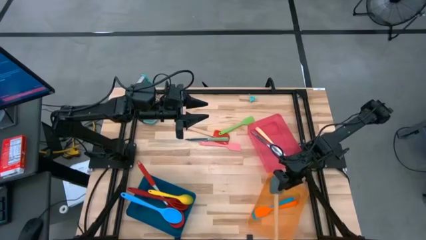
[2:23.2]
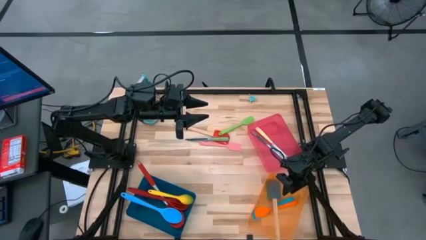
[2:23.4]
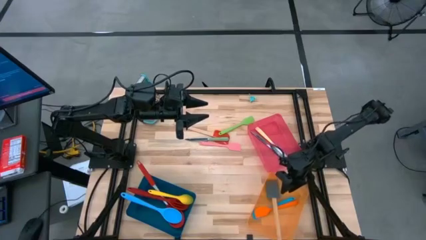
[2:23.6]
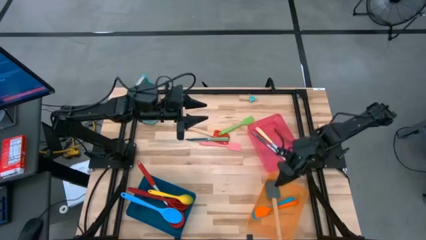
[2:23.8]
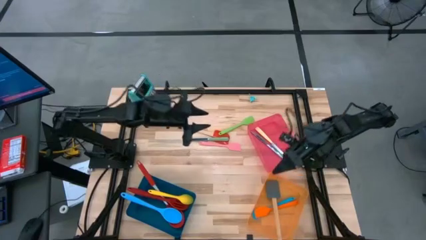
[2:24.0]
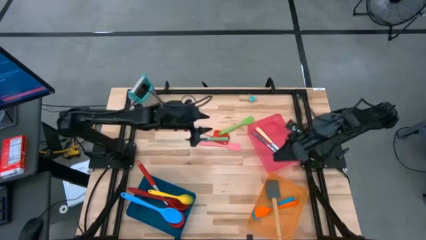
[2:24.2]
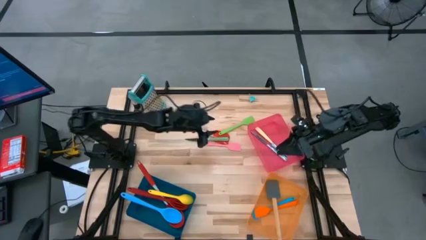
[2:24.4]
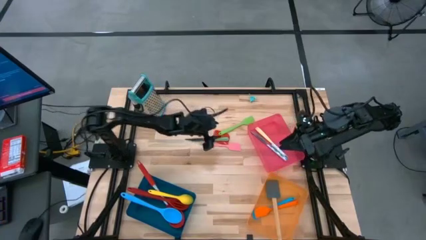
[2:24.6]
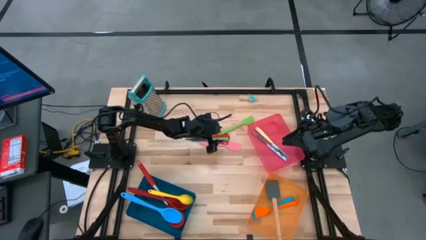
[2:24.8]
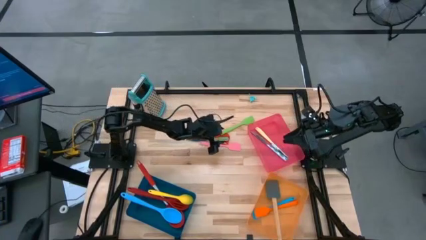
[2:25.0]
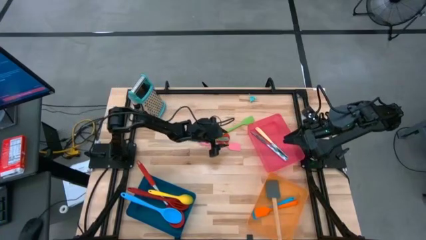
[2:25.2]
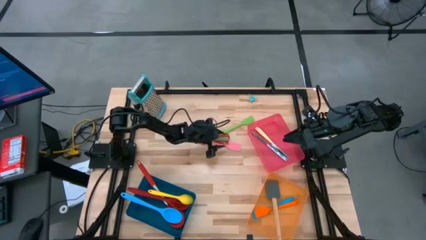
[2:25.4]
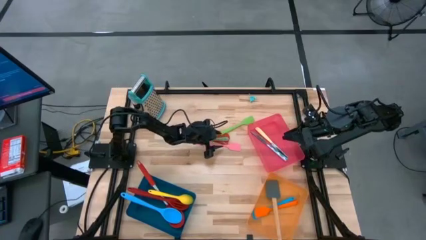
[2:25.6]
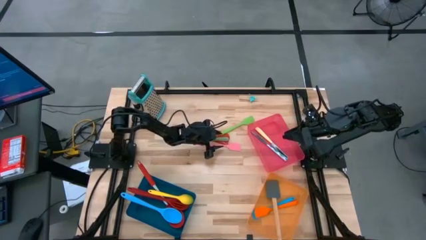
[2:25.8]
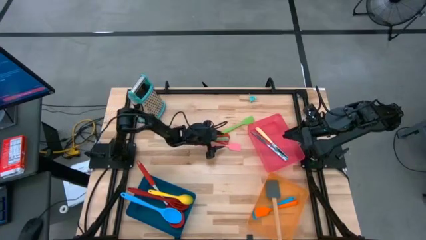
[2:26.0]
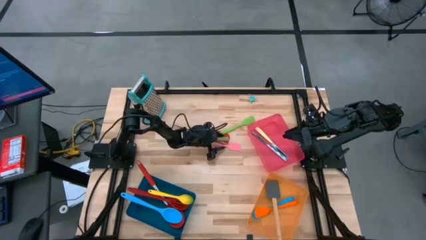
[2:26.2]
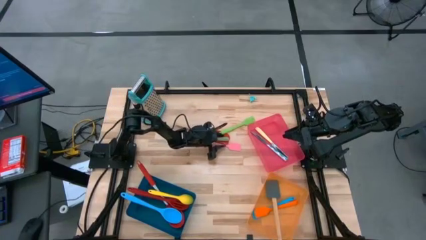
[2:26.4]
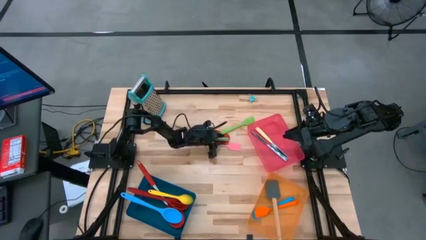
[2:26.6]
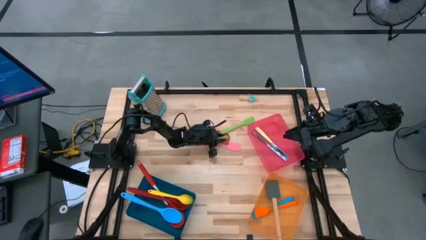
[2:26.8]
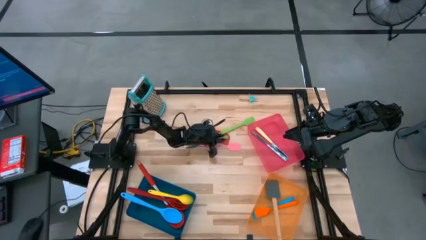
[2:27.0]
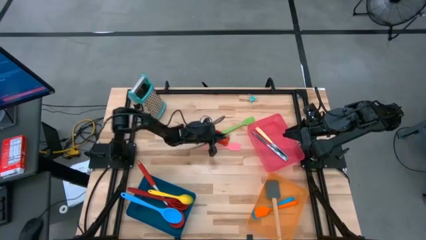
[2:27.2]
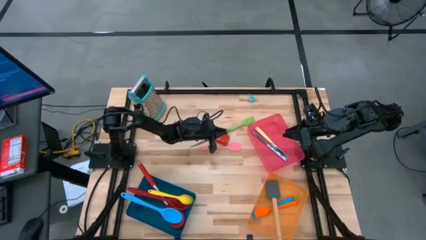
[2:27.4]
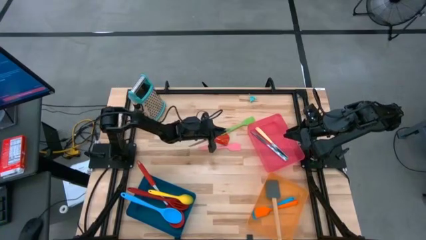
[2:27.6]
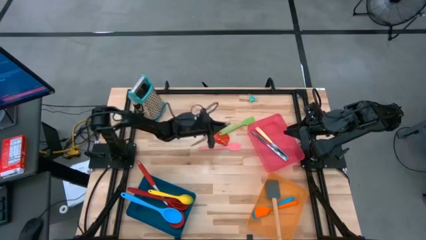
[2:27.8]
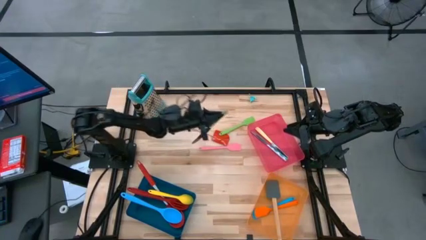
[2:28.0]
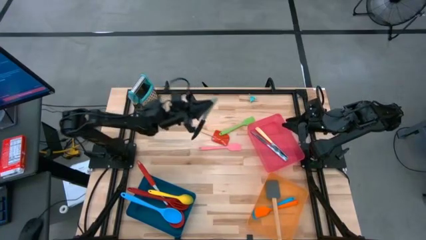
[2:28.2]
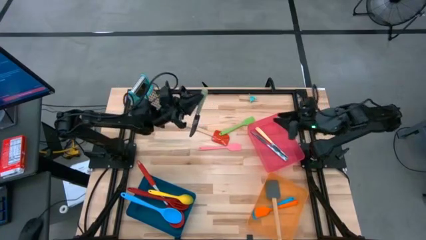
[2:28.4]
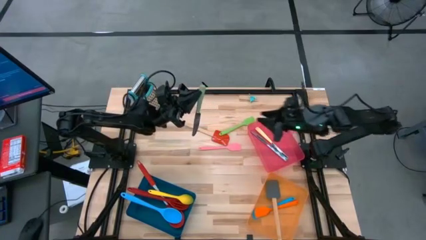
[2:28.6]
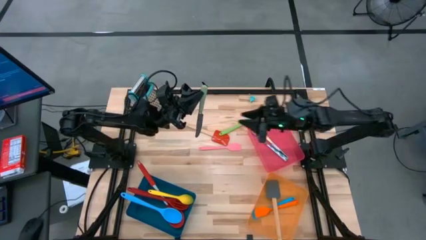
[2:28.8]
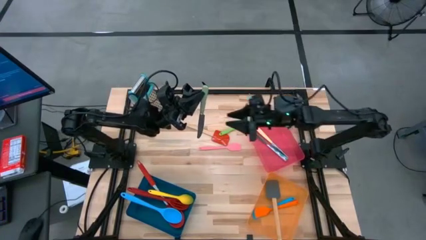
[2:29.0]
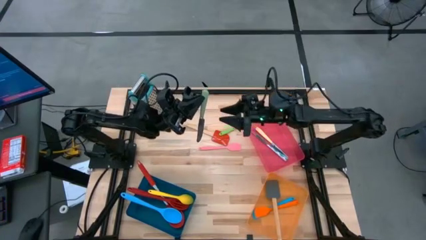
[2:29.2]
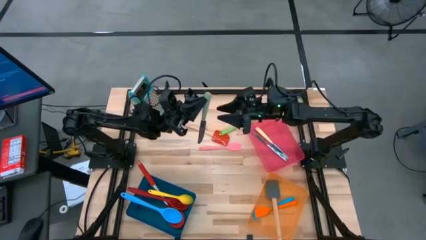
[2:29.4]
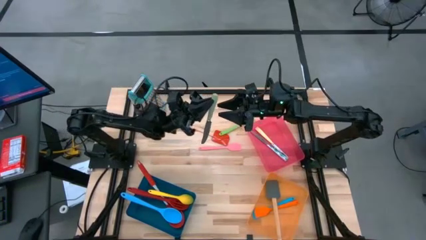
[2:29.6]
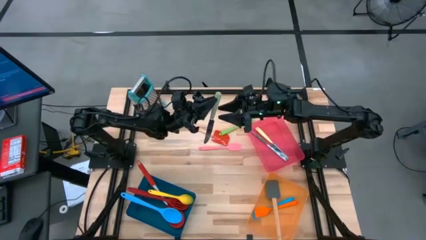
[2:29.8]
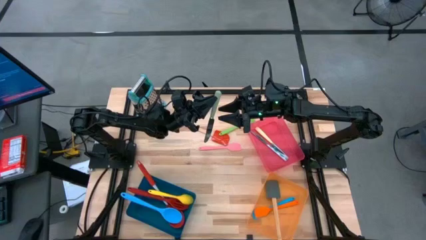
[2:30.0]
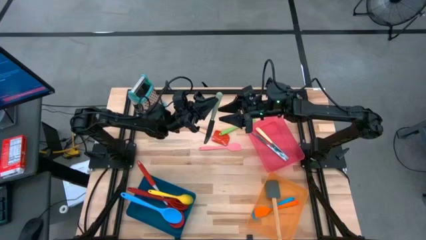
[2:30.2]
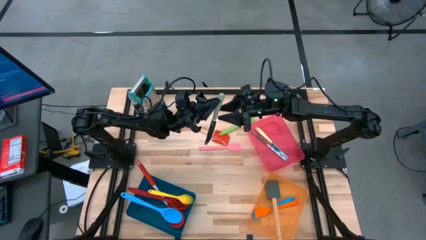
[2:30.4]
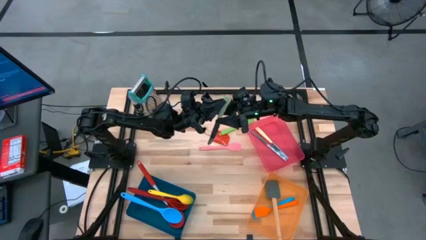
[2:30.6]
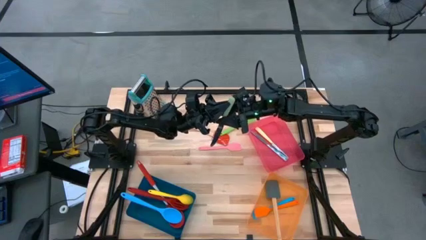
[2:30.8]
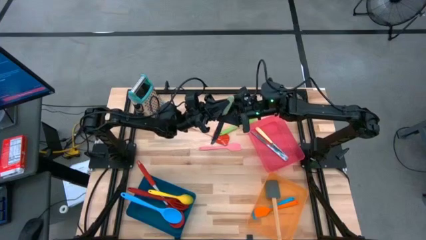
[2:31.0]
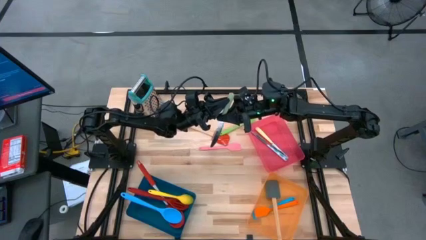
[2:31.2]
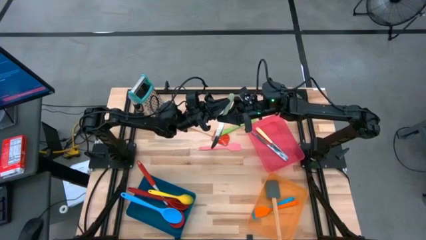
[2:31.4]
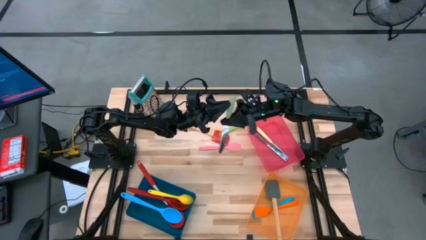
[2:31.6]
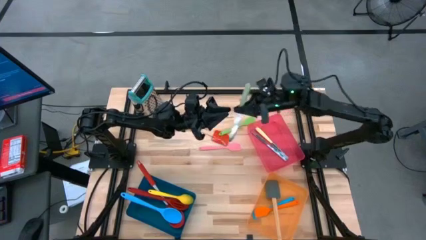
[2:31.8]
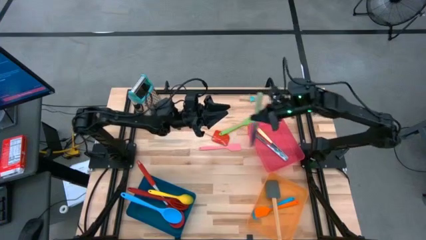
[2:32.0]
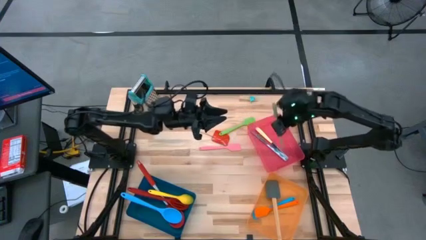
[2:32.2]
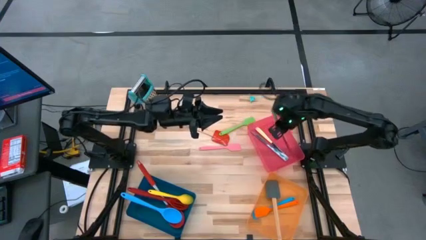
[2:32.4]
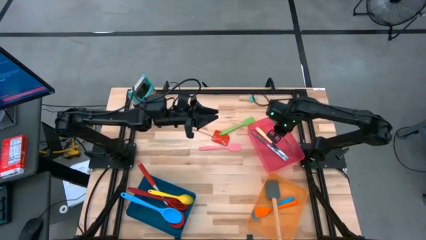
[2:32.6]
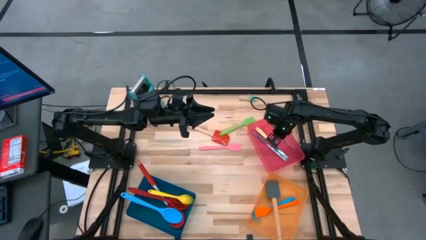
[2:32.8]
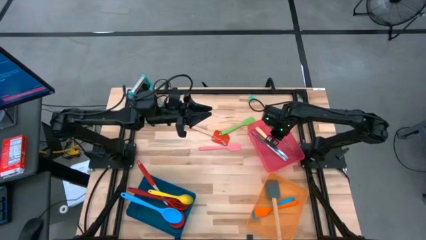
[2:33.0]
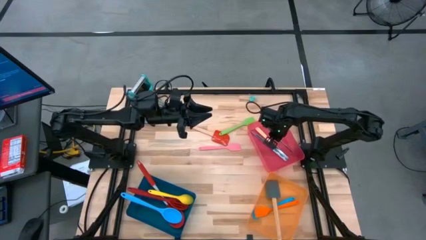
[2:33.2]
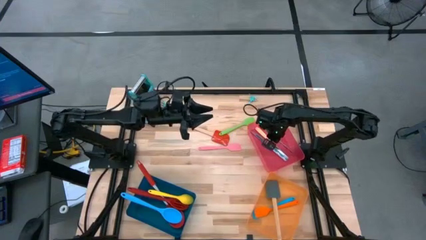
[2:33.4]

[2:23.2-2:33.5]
Task: Pick & Place Kitchen Items
Put the green table knife into the red bin

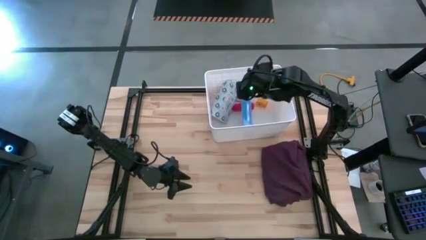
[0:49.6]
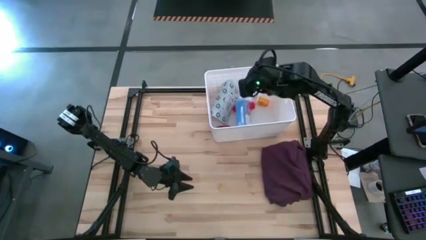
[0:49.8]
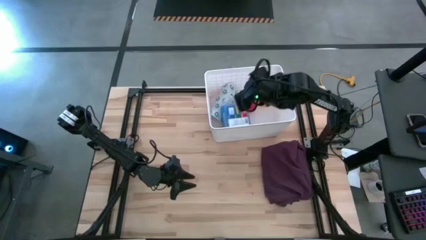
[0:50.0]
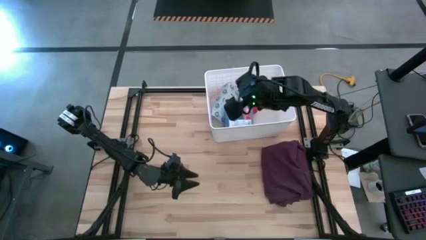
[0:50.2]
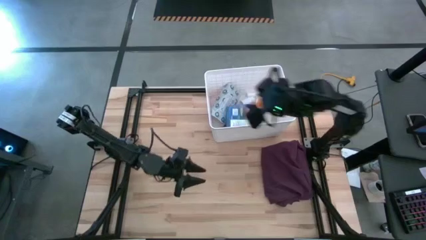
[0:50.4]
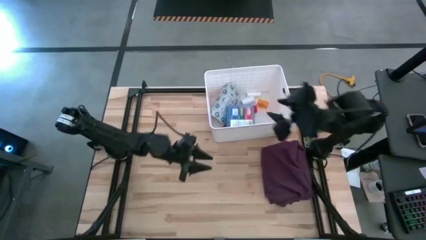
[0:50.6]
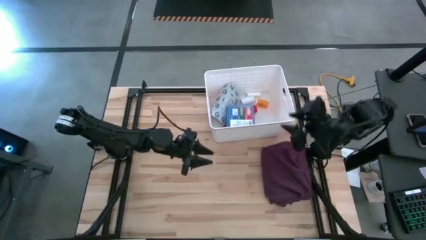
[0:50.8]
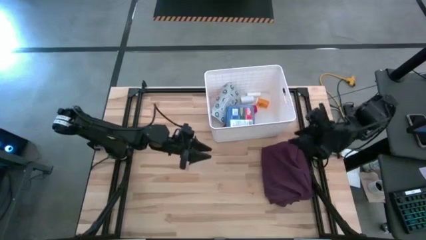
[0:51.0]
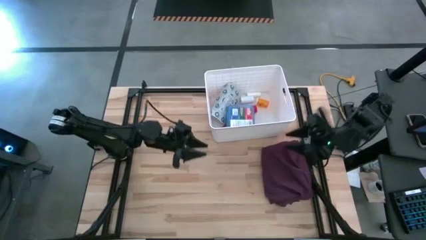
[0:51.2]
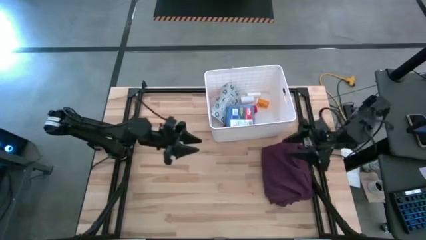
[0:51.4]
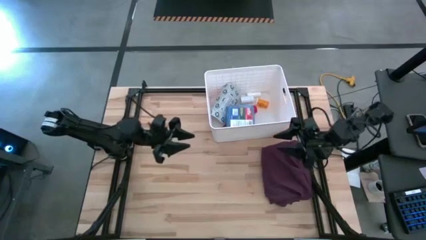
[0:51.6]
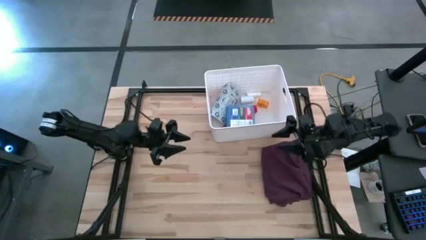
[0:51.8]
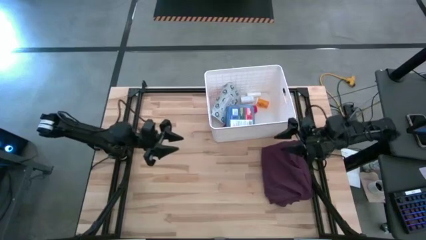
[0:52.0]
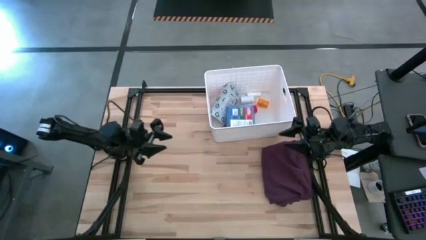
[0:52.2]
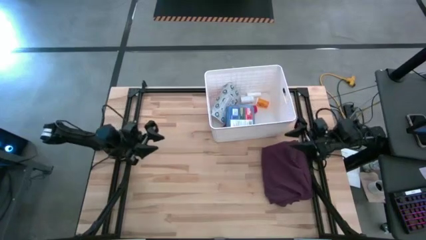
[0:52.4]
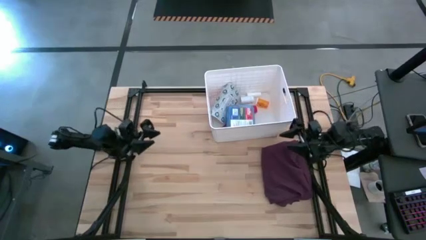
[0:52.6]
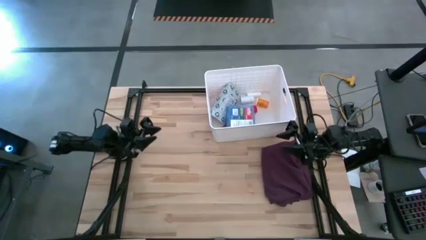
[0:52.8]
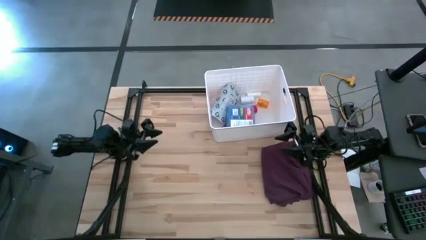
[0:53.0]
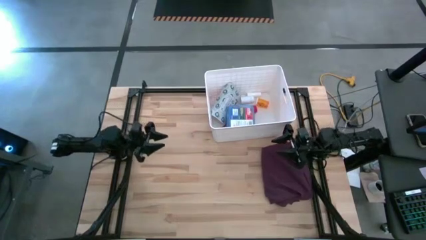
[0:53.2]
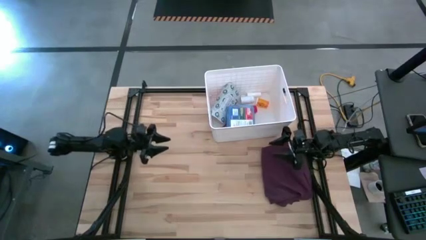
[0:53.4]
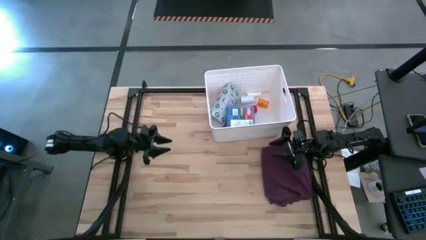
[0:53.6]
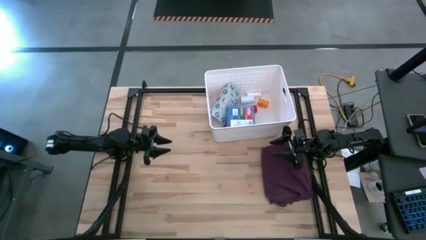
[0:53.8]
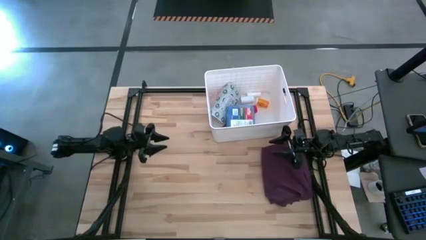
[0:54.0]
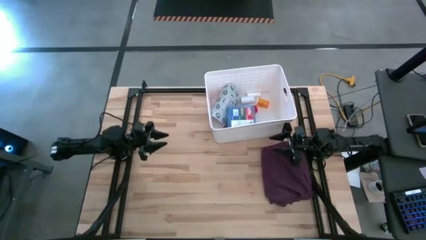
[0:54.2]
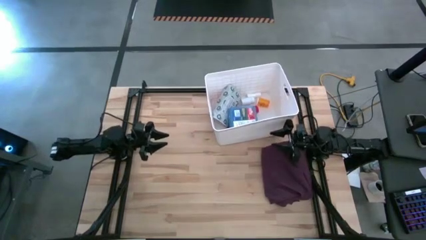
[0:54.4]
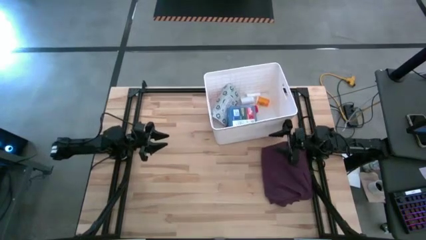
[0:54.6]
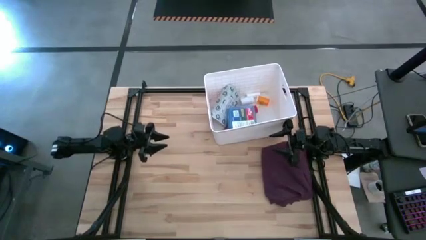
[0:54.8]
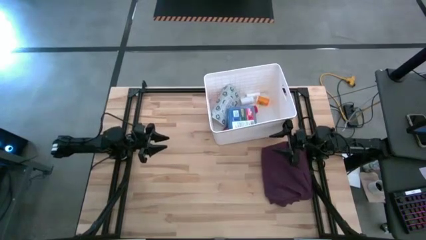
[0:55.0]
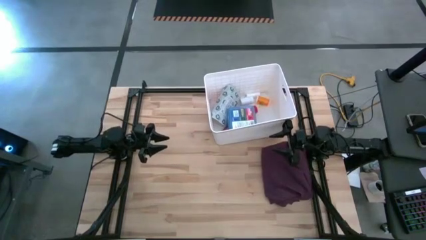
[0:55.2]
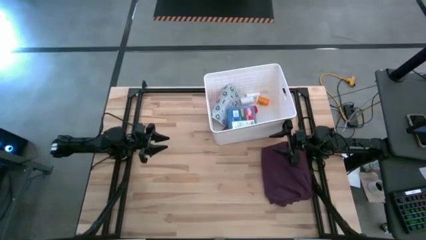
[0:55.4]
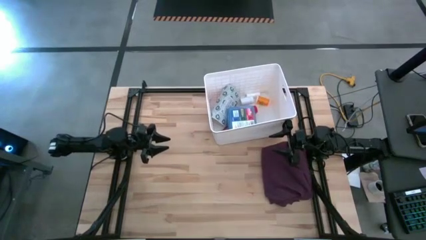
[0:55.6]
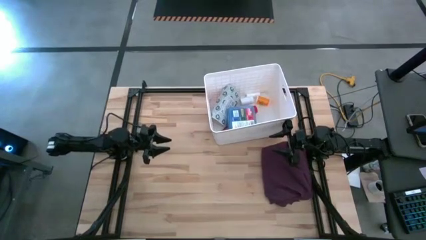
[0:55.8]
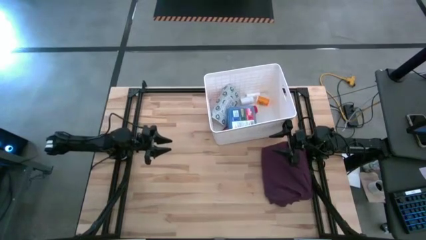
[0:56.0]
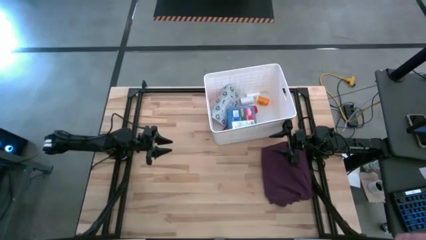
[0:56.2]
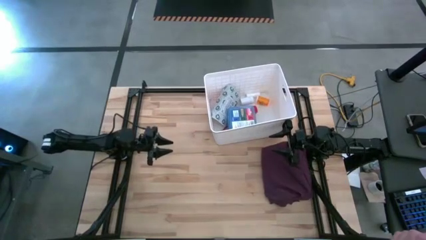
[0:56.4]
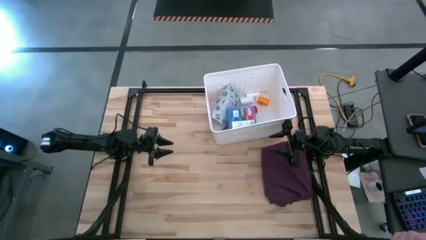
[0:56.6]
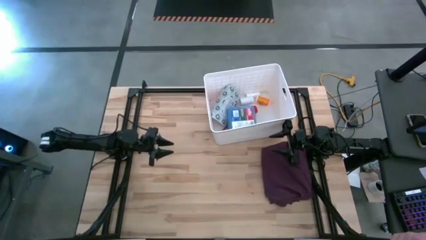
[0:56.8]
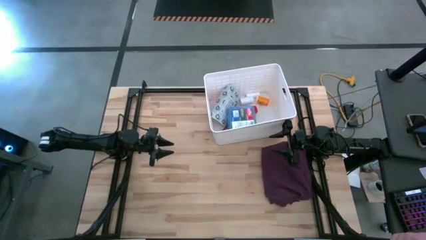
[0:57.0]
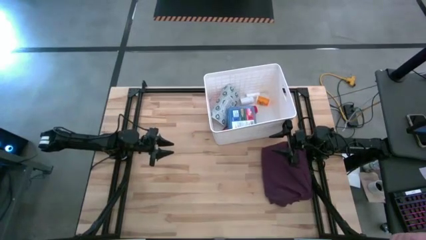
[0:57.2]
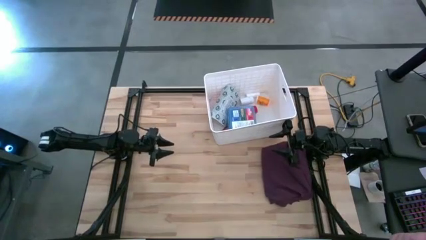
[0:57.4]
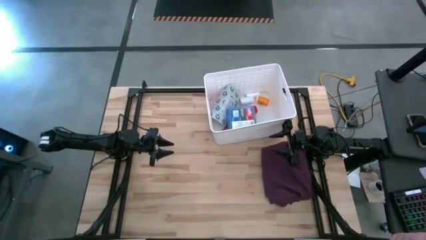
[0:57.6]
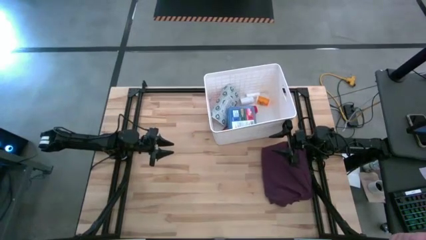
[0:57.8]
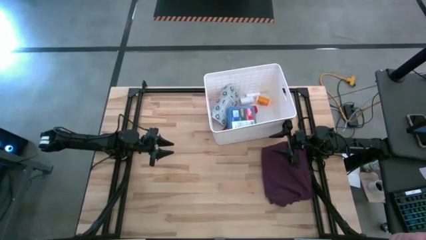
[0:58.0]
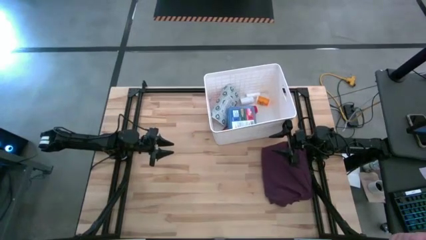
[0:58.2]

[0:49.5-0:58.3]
Task: Pick & place medical supplies in basket/bin
Return to Home Position
